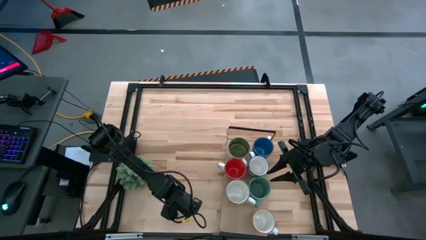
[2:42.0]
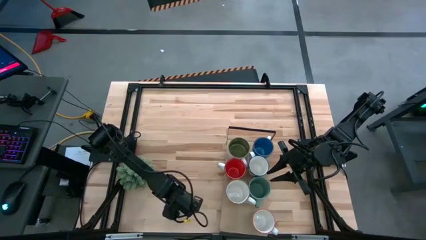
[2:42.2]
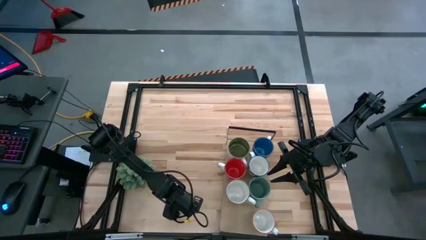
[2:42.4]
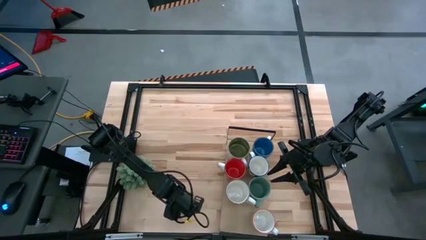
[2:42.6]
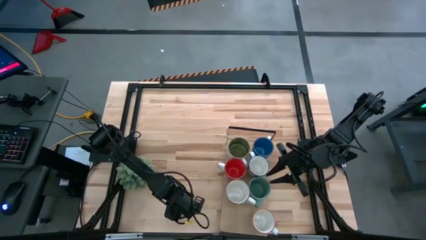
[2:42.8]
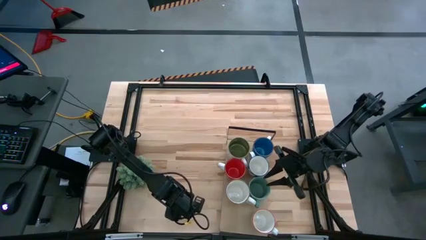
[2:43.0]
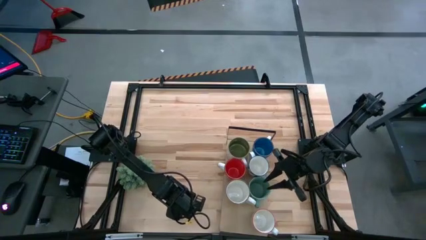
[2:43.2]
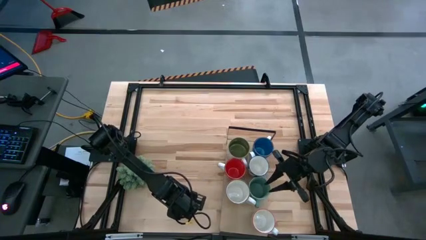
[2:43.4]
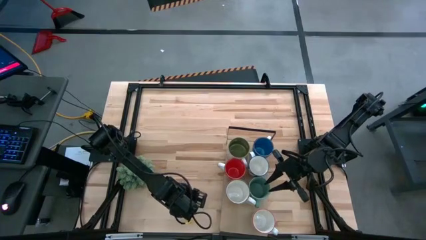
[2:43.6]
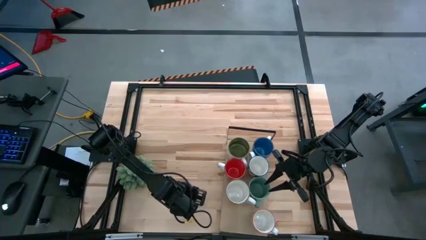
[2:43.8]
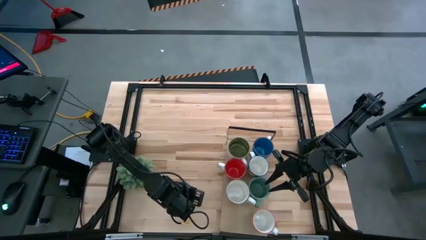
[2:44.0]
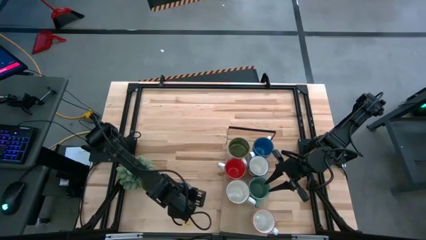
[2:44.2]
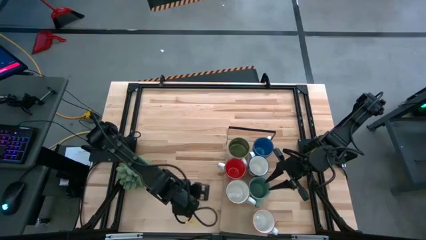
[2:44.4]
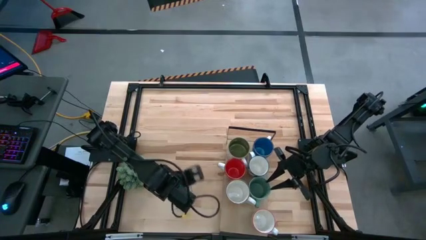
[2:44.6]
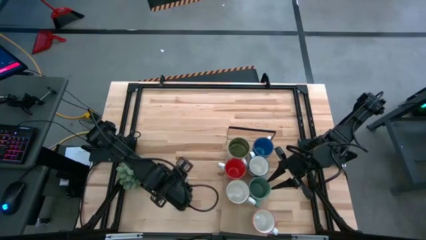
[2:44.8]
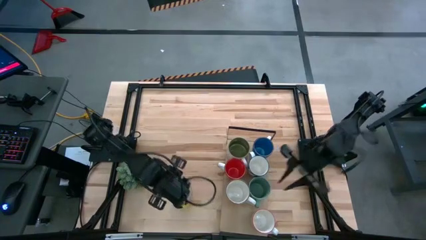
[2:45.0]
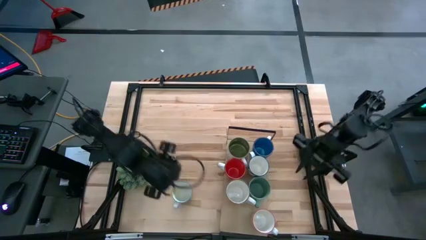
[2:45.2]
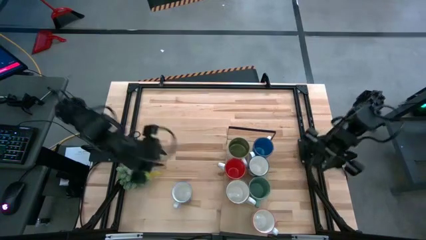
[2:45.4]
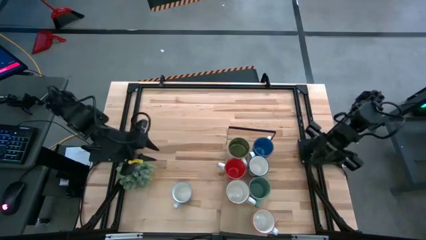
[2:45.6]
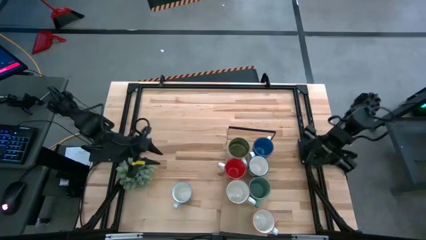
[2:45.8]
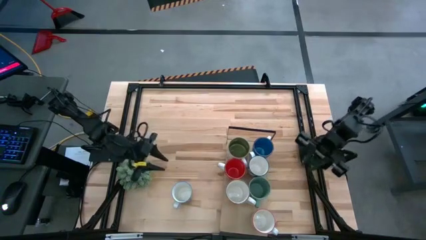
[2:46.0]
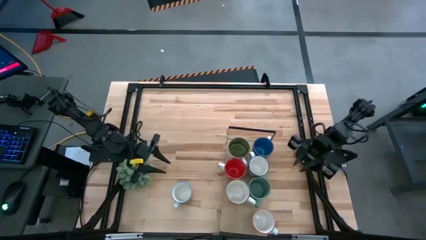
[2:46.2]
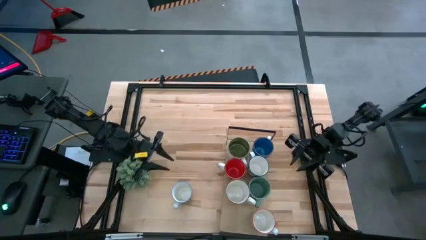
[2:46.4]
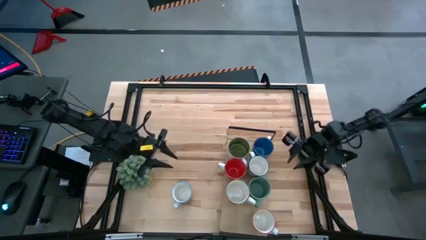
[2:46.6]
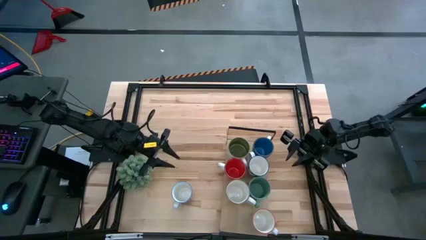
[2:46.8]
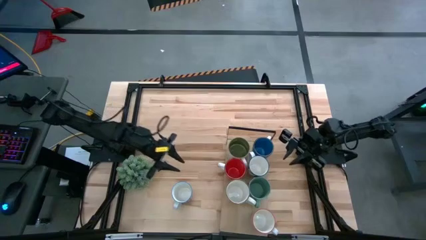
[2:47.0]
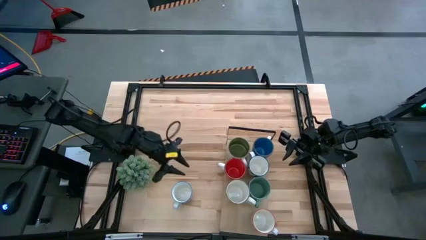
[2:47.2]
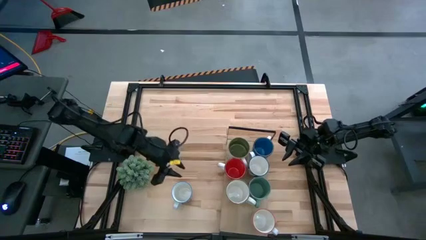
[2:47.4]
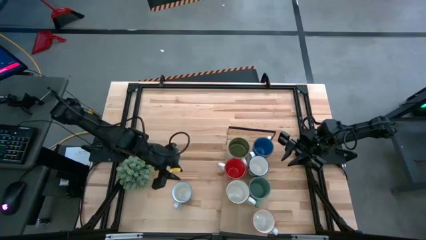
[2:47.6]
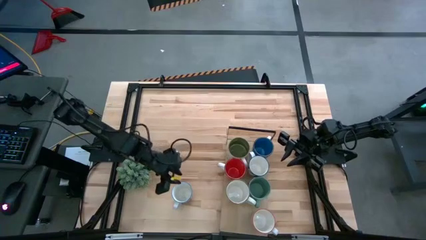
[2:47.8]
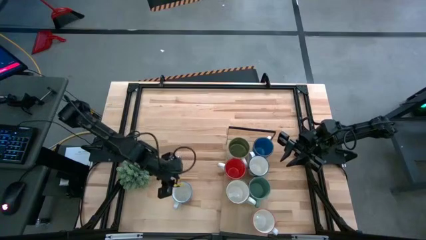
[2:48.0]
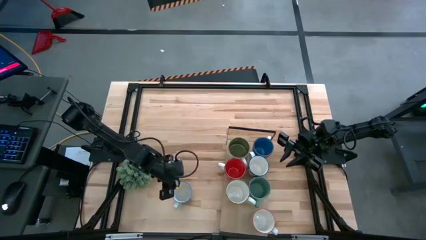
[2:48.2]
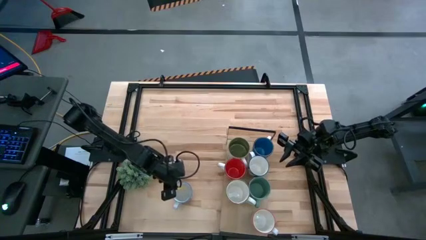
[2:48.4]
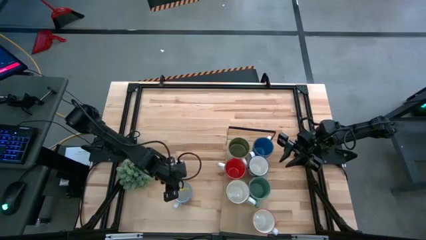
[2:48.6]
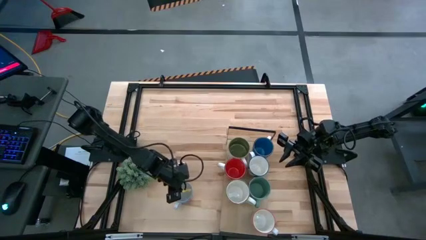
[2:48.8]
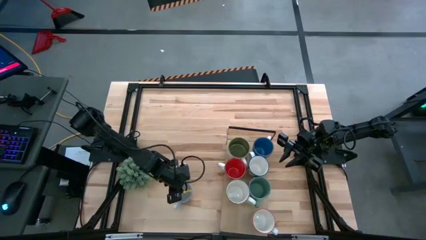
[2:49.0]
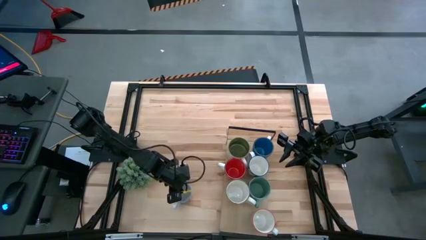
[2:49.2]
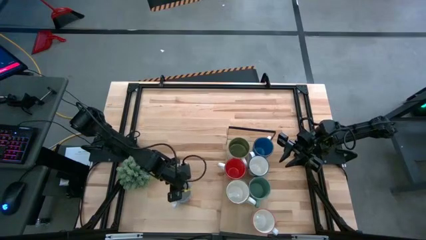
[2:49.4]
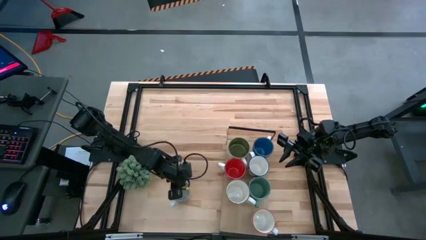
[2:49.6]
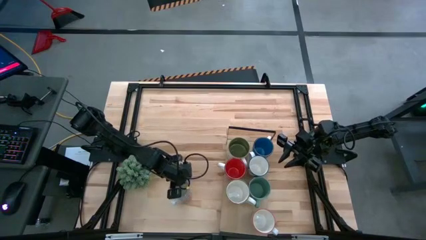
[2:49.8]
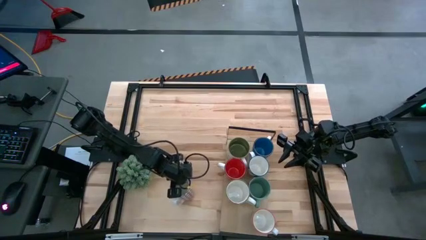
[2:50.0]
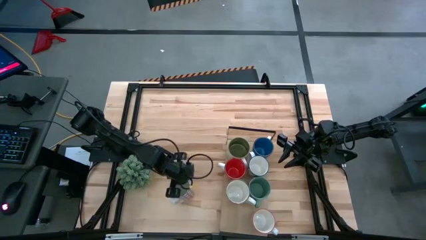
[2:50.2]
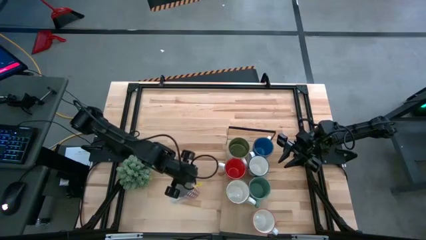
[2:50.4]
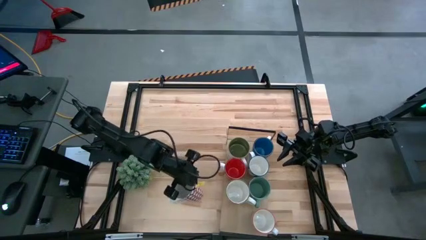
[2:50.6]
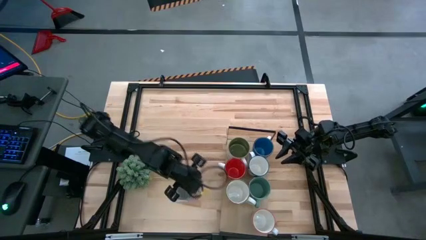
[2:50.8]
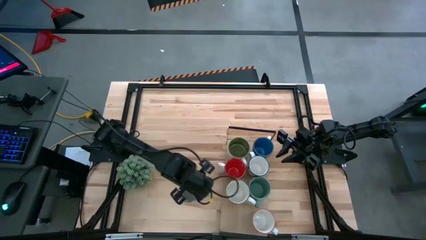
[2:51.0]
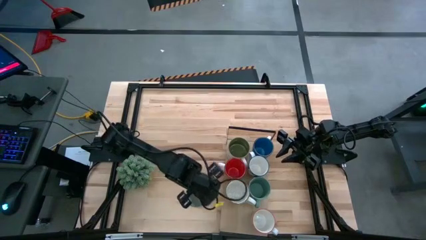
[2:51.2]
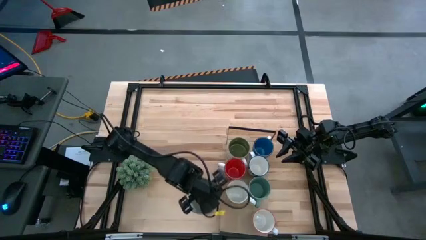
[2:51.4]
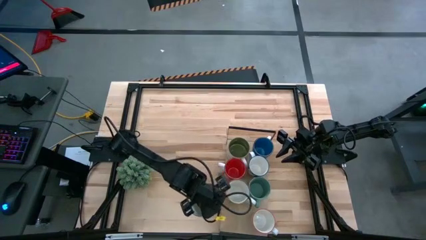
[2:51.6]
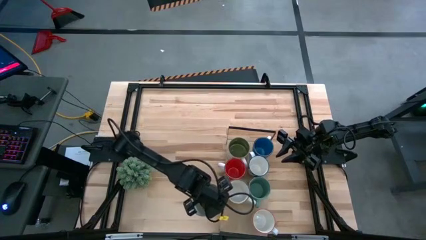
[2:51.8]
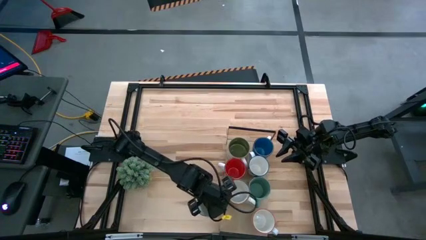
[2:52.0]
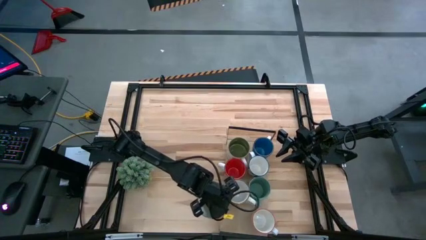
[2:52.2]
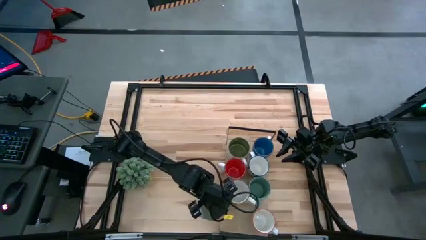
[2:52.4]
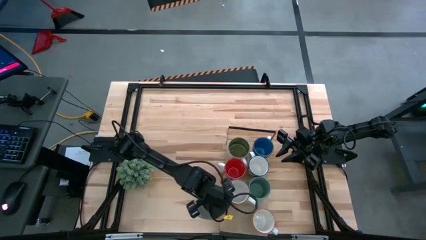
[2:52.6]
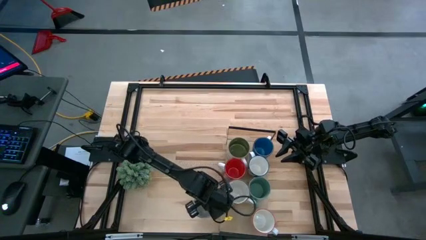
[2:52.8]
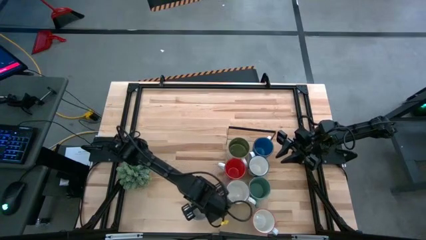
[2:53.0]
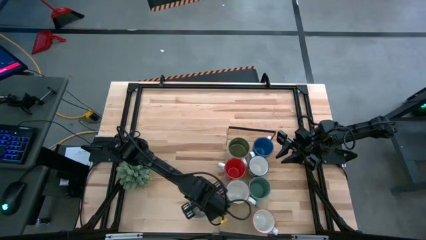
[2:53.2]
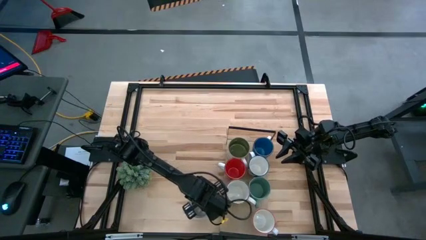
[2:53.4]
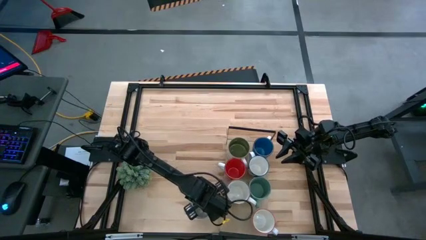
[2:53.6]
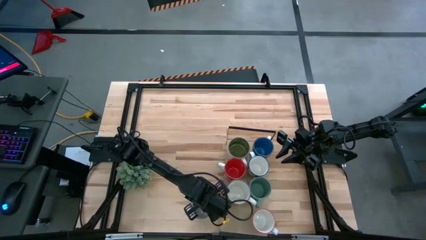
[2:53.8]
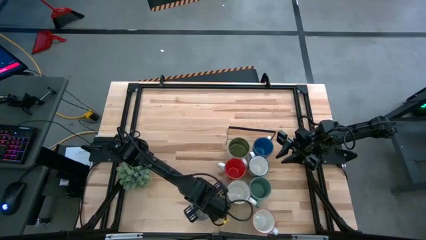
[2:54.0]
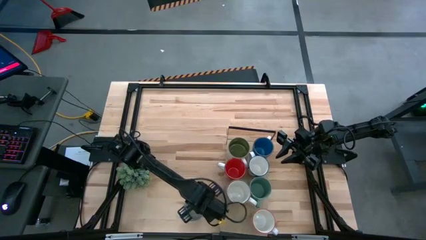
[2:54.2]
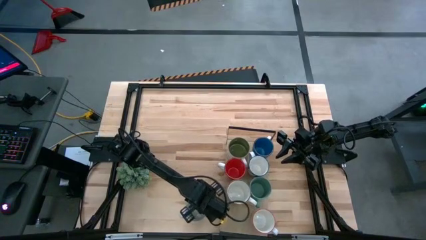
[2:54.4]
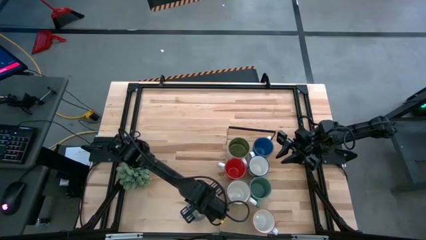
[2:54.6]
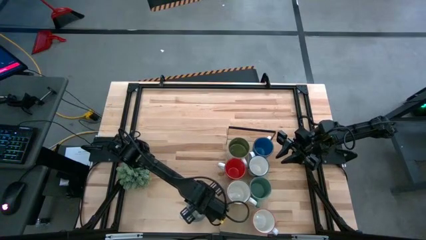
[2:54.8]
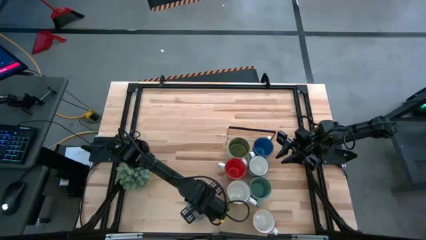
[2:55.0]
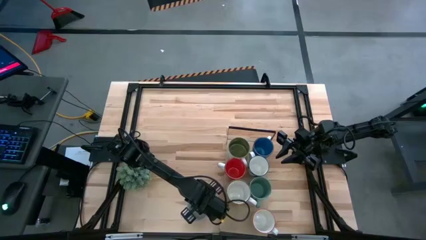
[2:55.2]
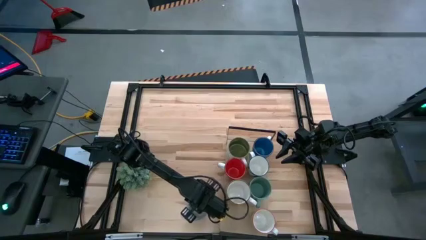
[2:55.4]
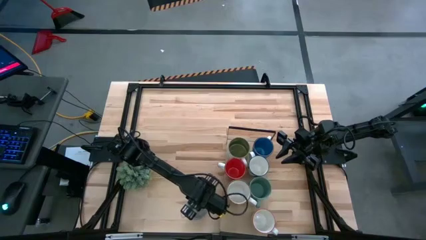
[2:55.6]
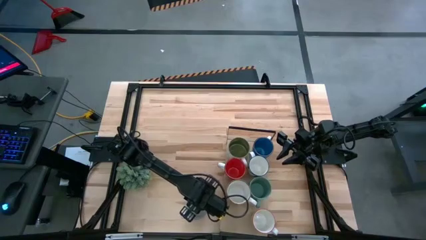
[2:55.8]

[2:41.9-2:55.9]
Task: Place coffee mugs
Put the red and white mug on the shelf
